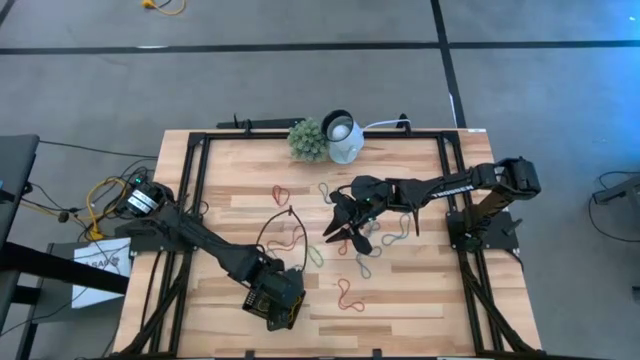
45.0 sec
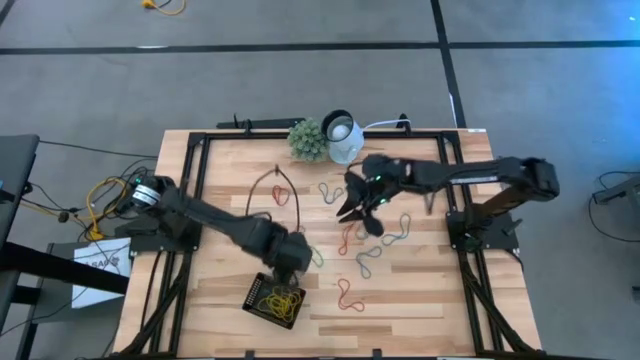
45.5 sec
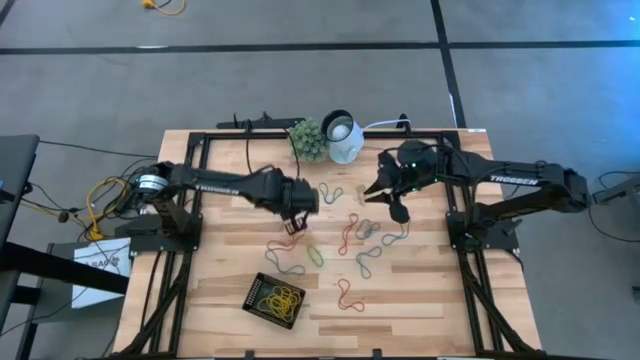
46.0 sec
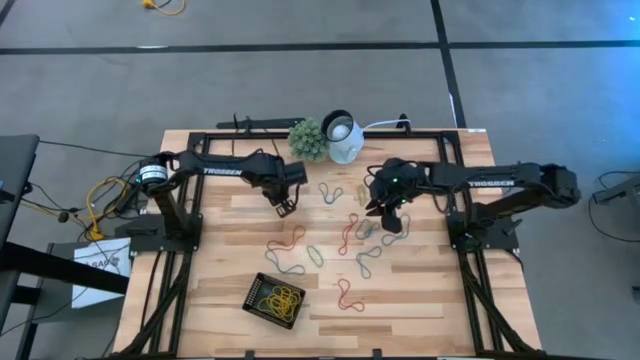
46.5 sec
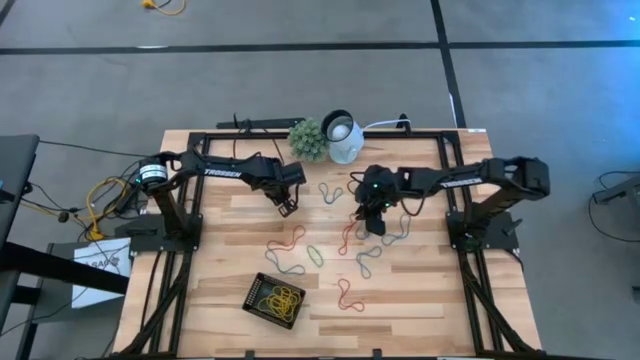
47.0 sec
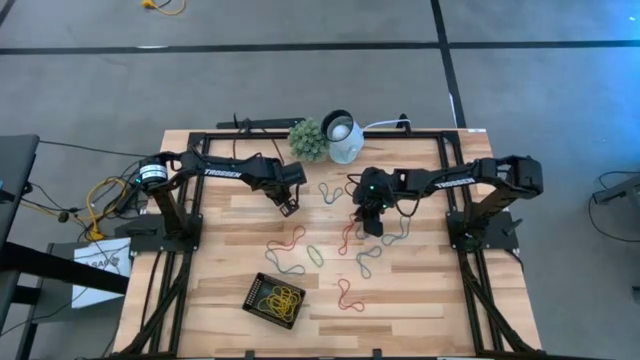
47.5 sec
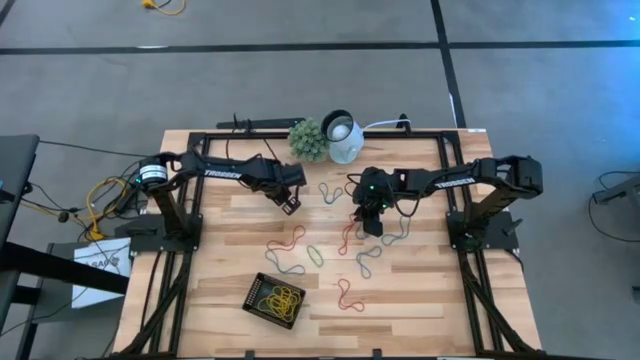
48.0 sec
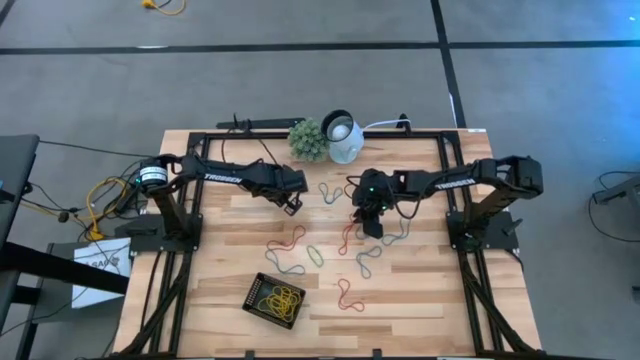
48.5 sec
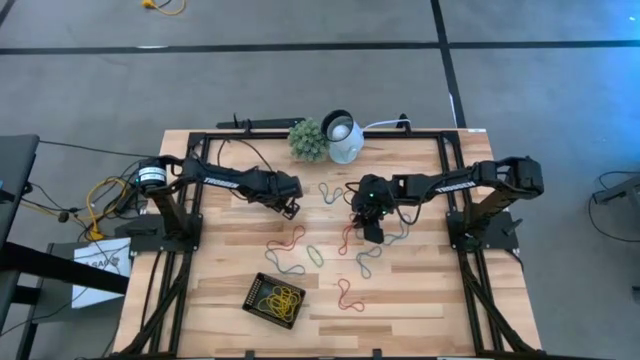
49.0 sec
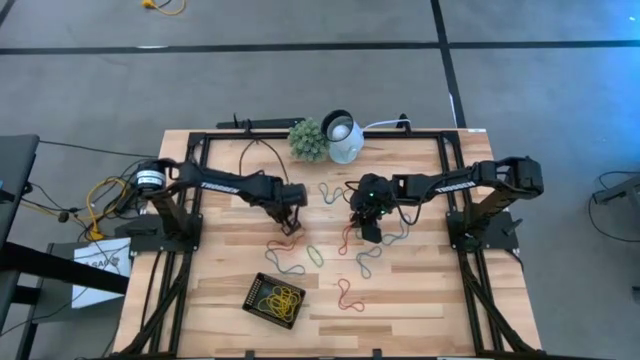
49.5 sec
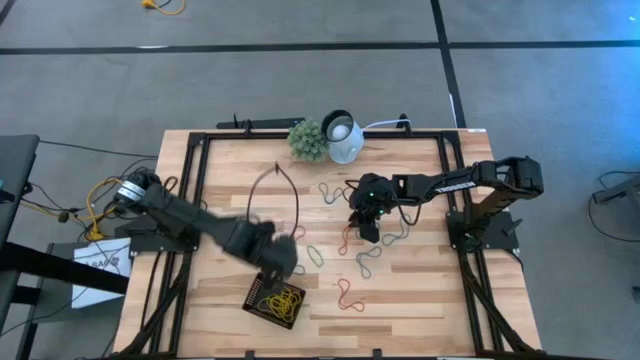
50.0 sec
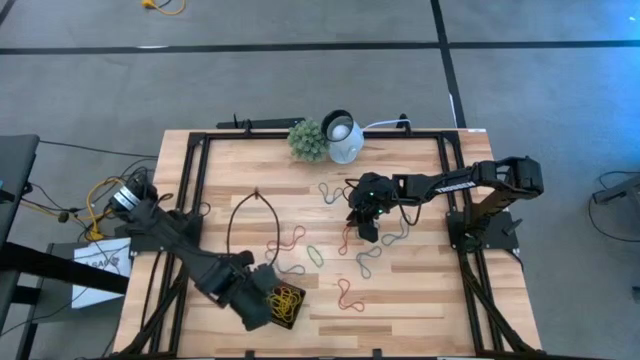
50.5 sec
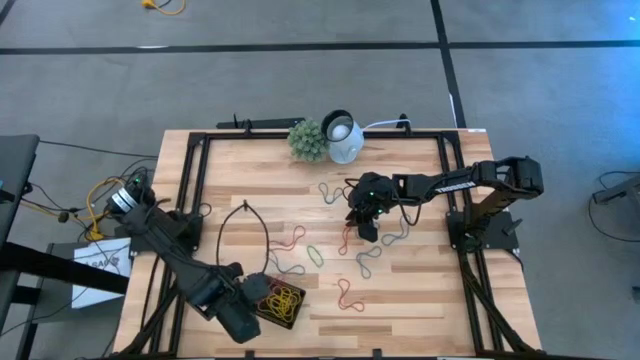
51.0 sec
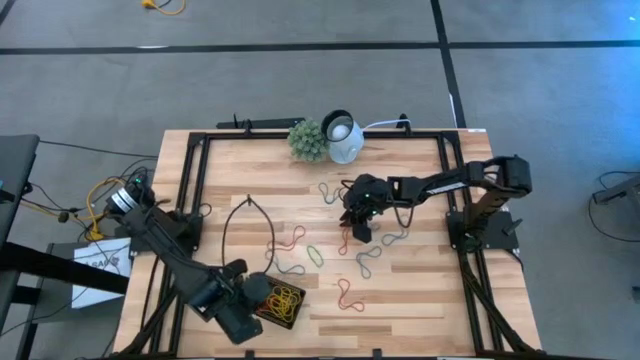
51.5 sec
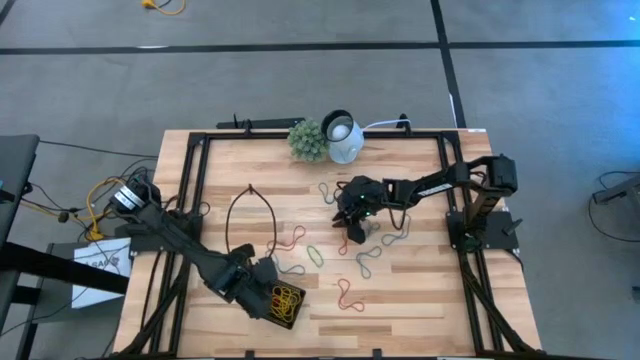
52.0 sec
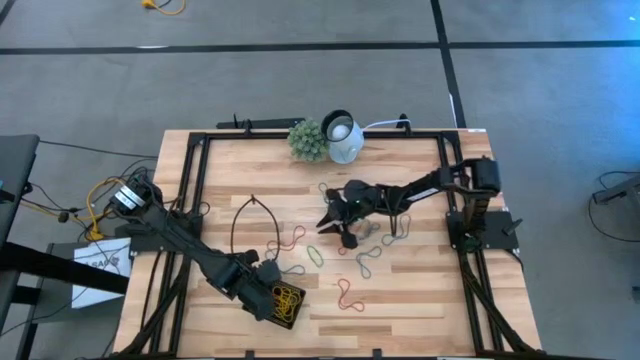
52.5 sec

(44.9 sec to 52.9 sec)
Task: Pick and place items into bin
Put the red rubber band into the black bin

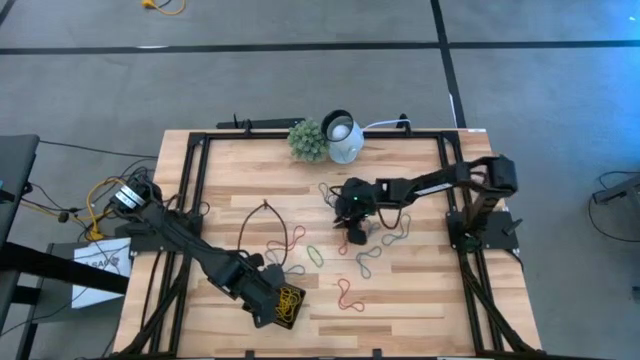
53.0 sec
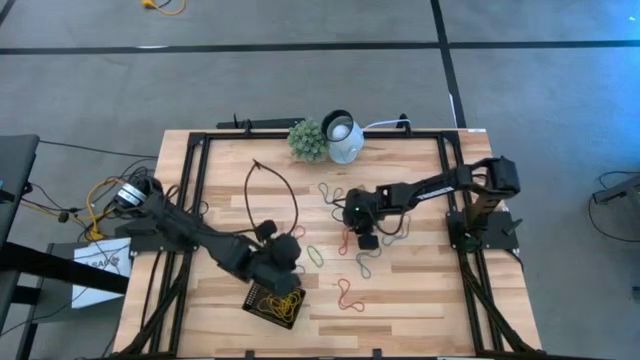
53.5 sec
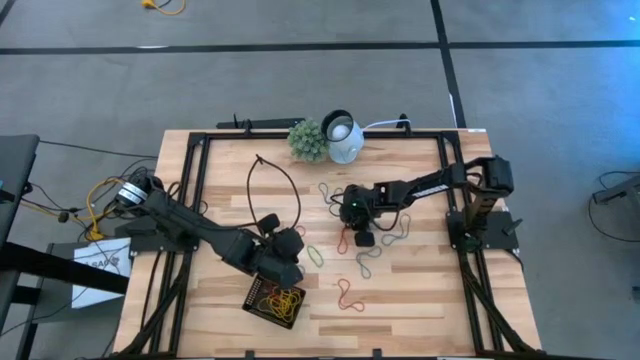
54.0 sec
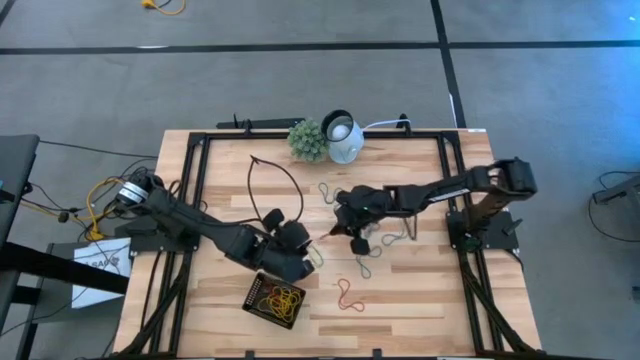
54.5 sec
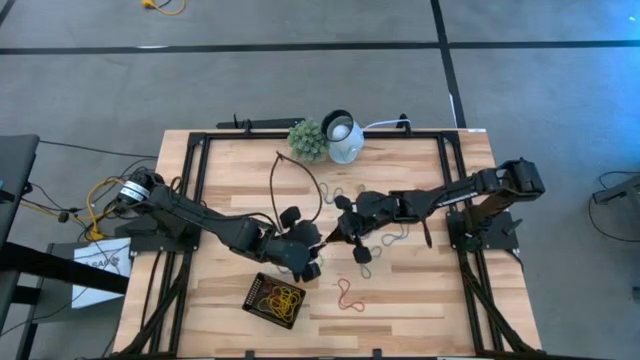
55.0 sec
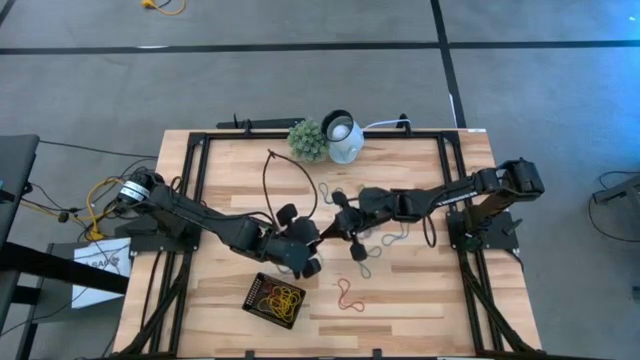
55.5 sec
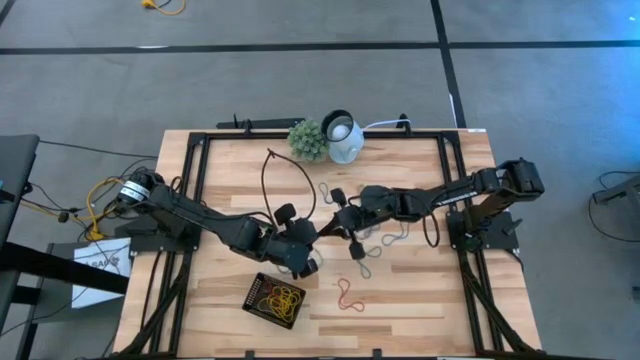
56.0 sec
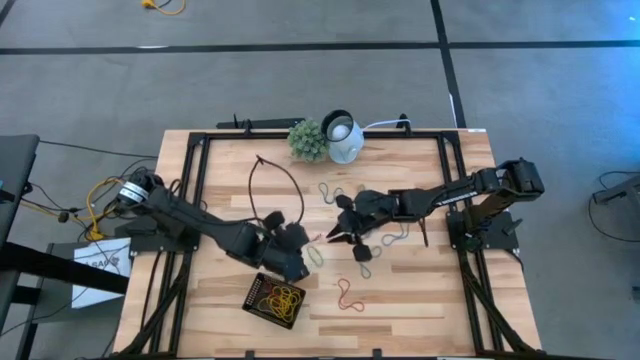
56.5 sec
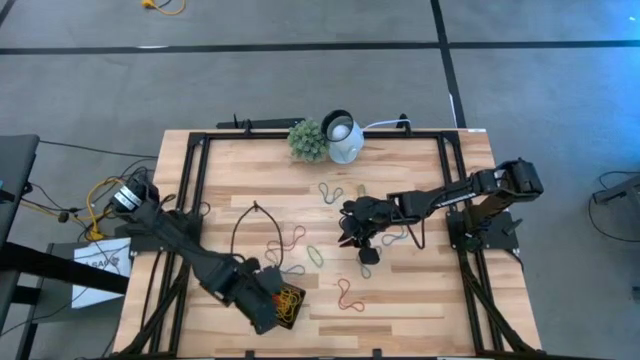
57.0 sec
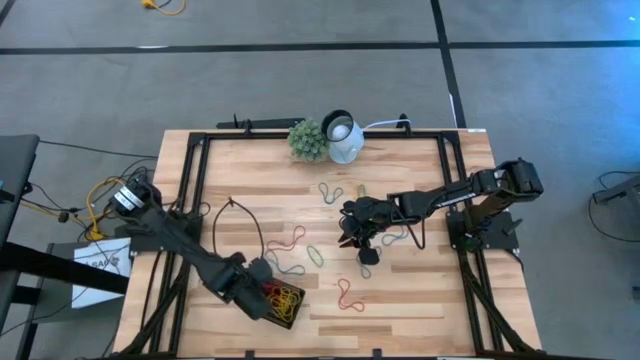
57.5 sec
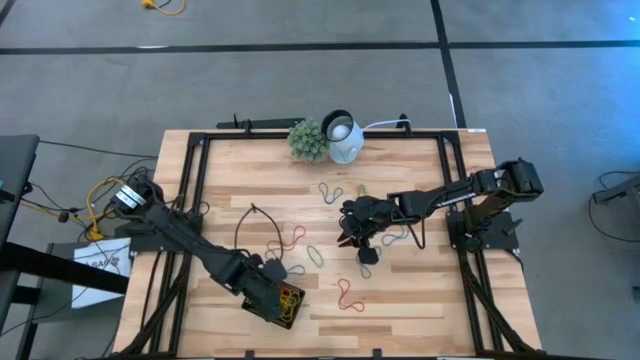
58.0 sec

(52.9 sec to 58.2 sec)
Put the red rubber band into the black bin

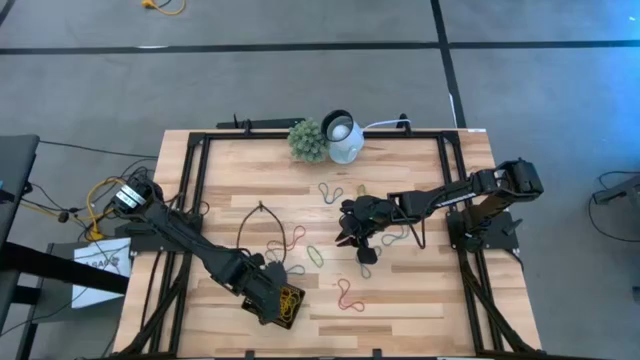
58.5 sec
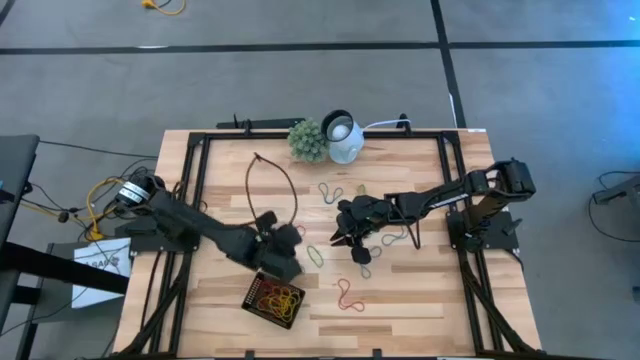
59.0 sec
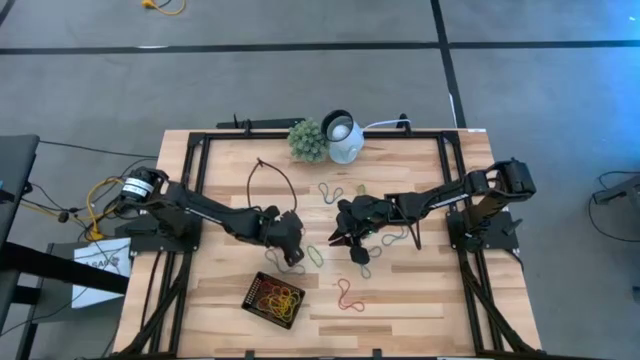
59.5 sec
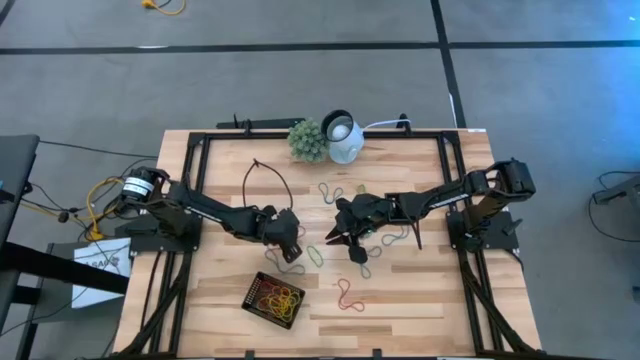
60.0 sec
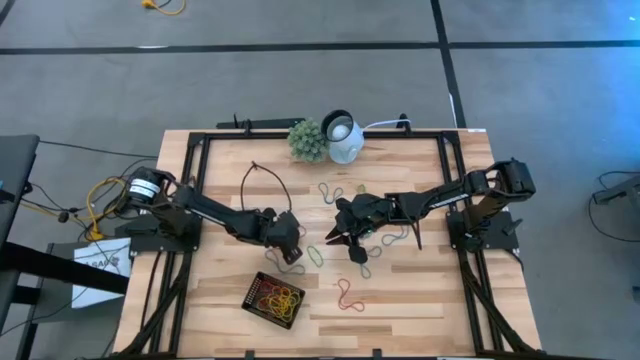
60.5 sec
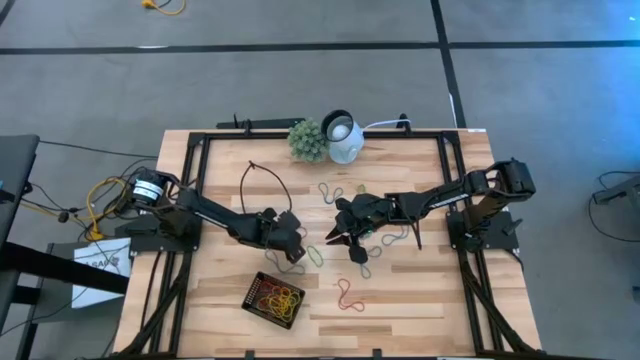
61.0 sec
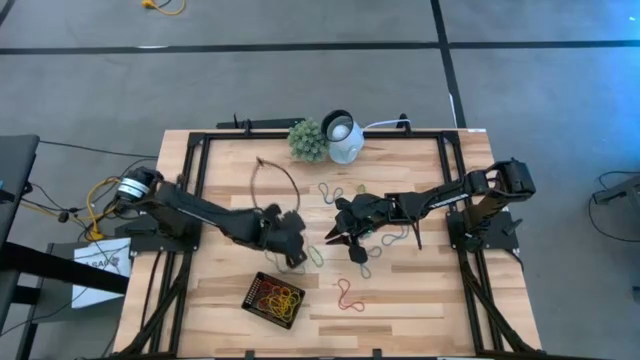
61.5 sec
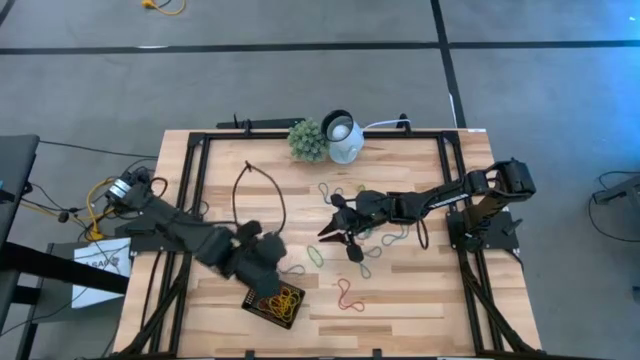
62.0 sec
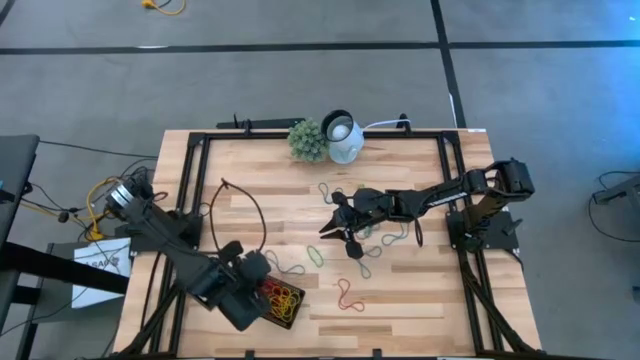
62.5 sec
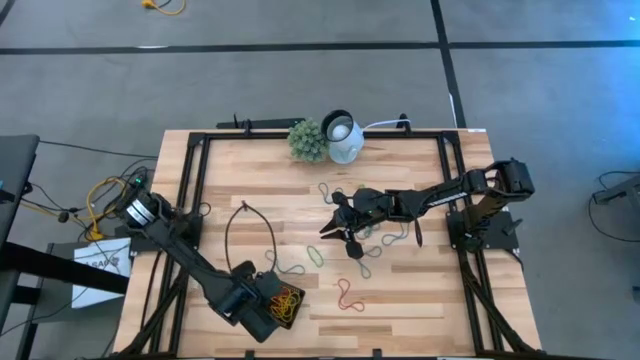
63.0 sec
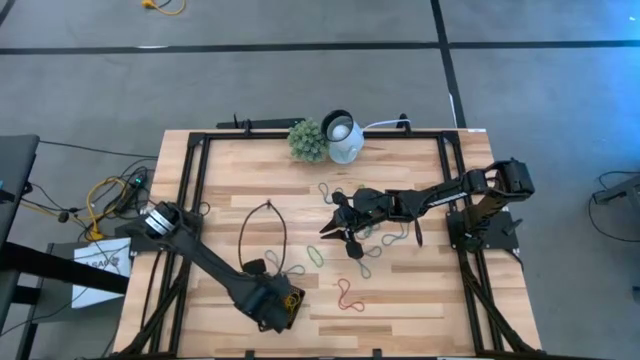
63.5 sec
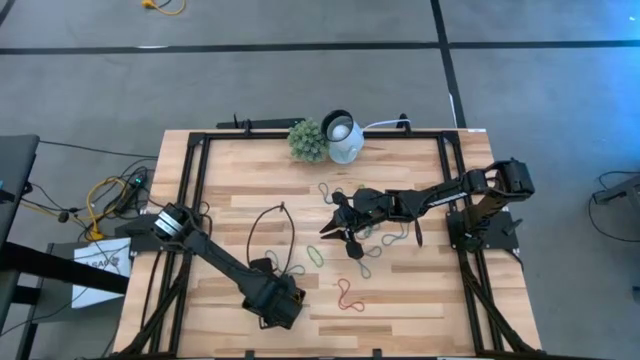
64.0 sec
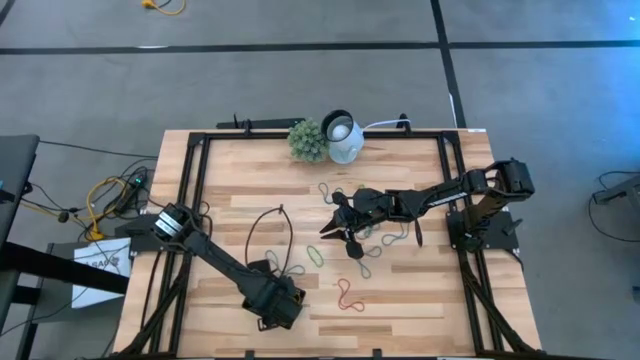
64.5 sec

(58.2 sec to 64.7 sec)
Put the red rubber band into the black bin

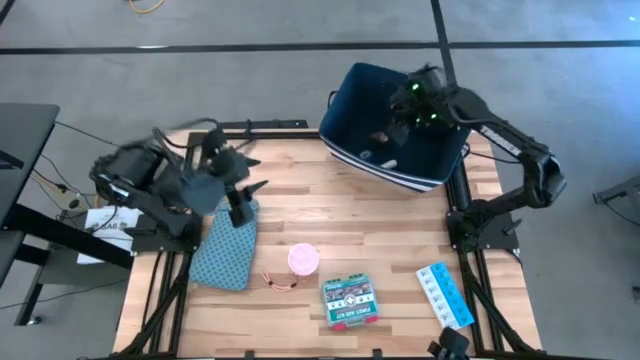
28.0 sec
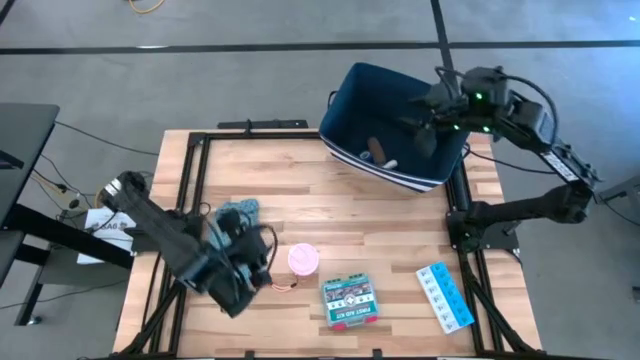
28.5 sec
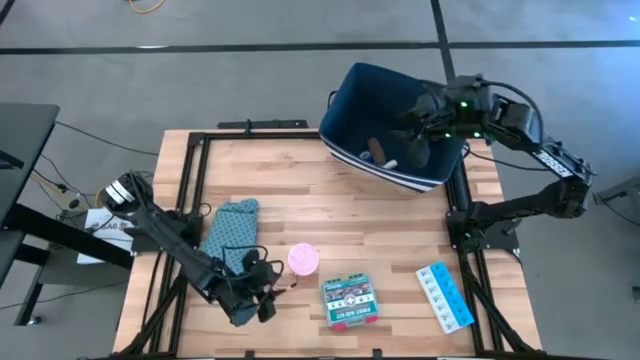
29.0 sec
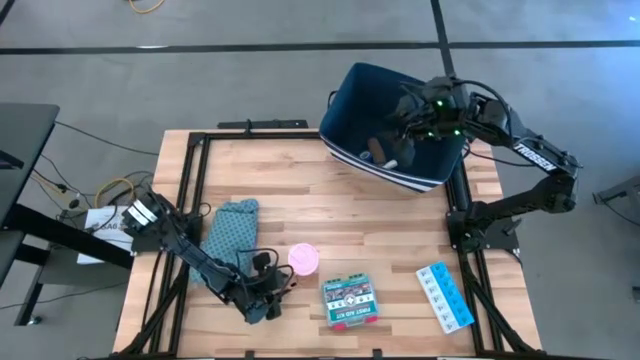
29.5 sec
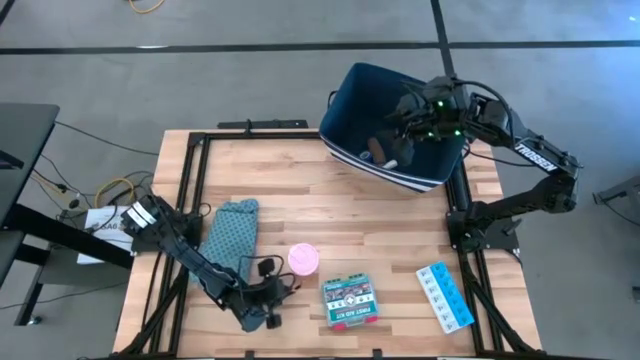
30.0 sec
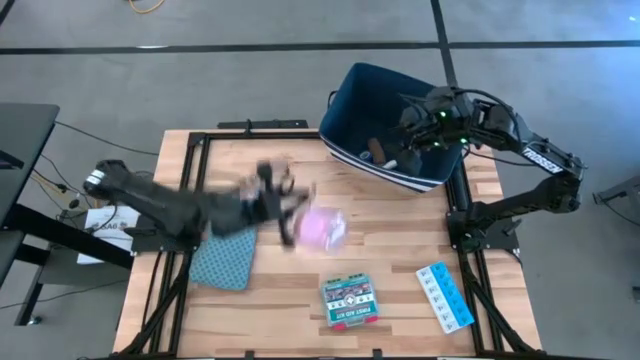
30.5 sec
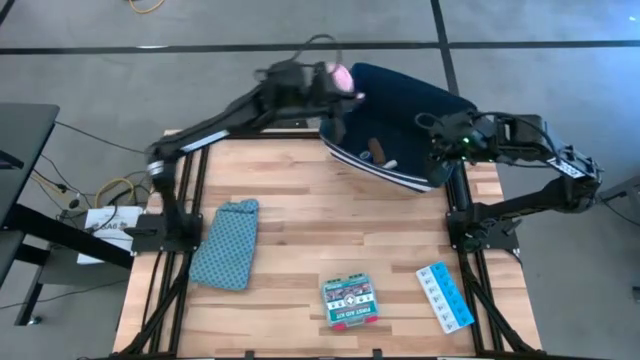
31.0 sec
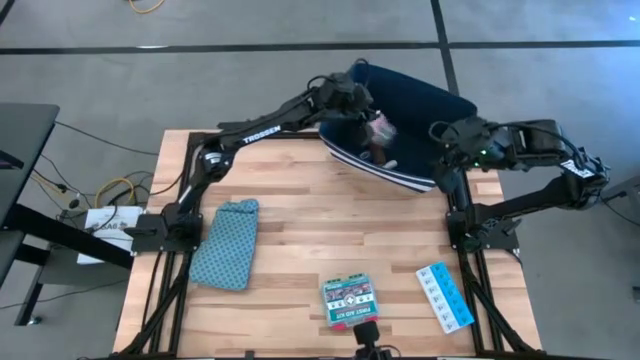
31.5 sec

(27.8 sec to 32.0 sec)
Task: Pick & place medical supplies in basket/bin
Put the pink pill dispenser into the blue organizer bin
